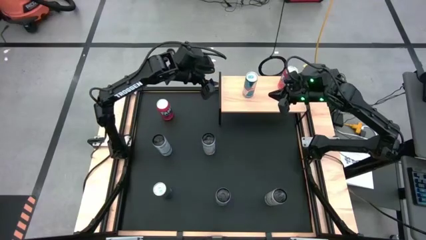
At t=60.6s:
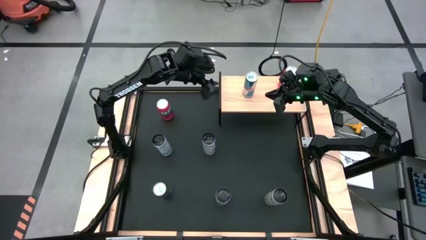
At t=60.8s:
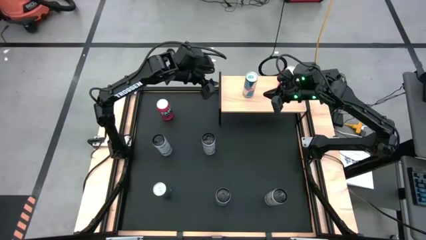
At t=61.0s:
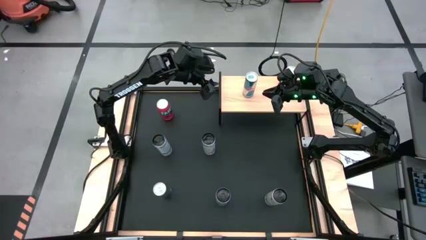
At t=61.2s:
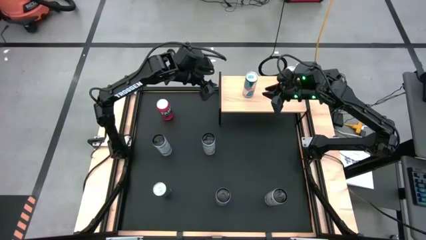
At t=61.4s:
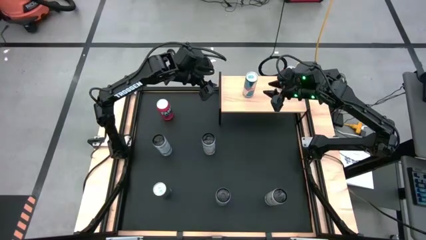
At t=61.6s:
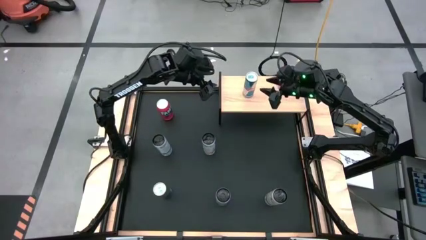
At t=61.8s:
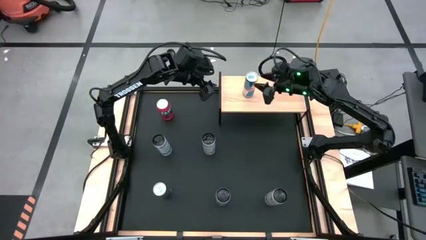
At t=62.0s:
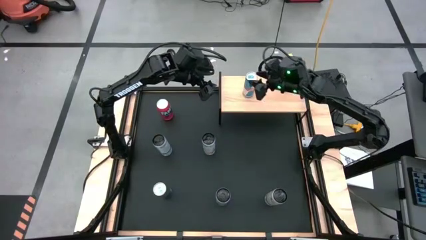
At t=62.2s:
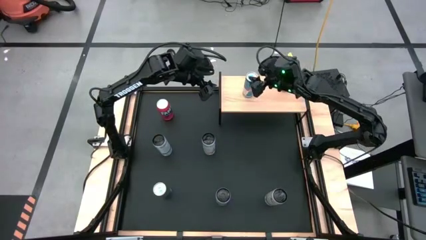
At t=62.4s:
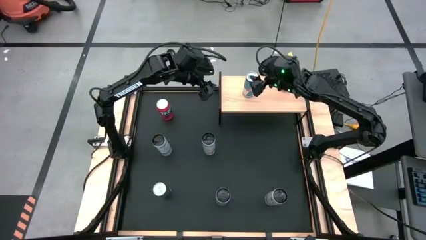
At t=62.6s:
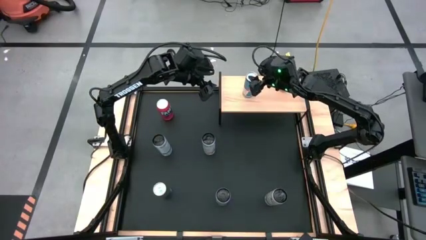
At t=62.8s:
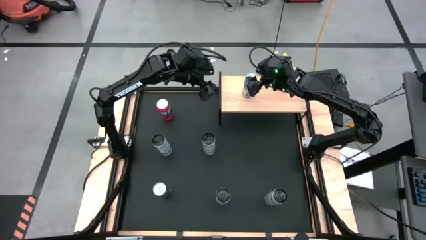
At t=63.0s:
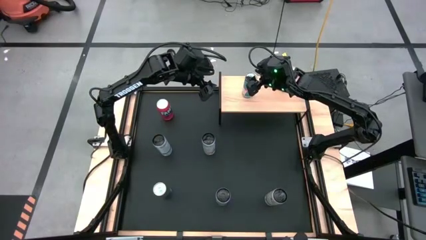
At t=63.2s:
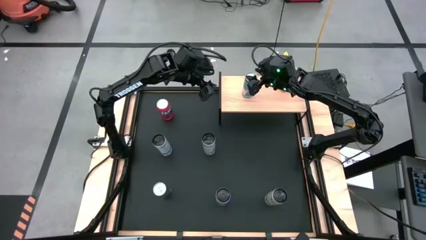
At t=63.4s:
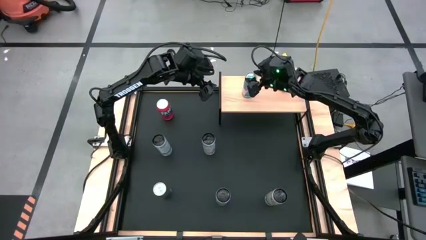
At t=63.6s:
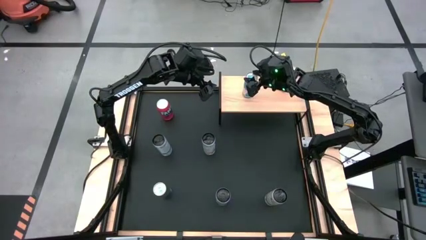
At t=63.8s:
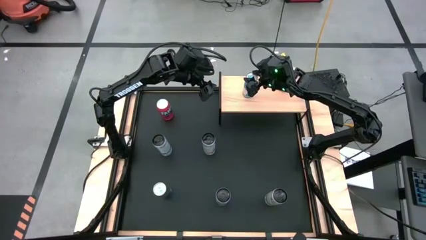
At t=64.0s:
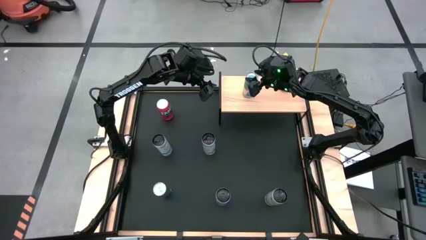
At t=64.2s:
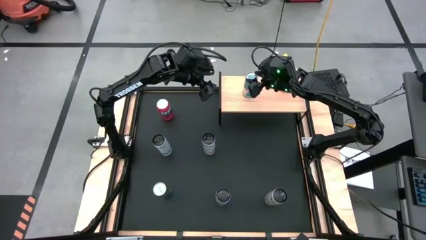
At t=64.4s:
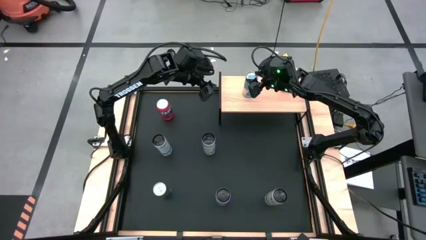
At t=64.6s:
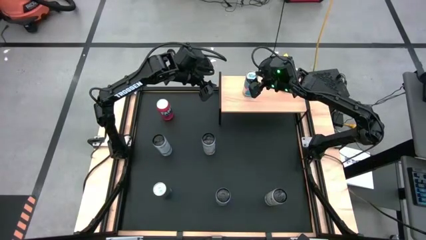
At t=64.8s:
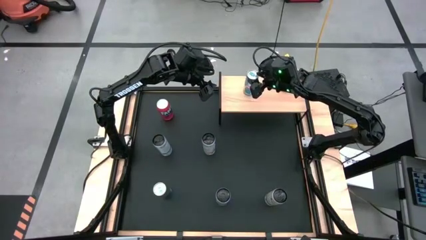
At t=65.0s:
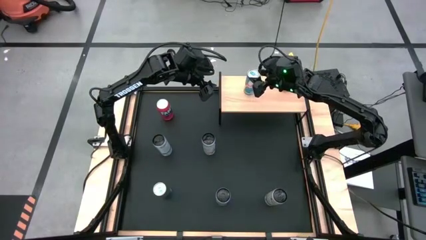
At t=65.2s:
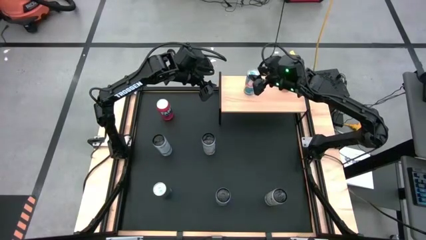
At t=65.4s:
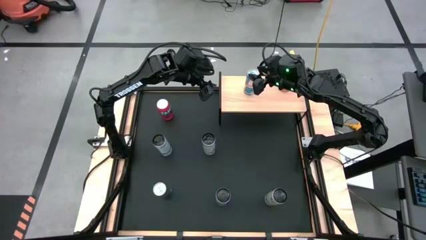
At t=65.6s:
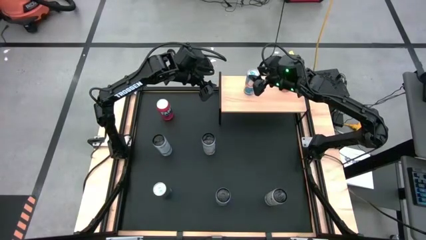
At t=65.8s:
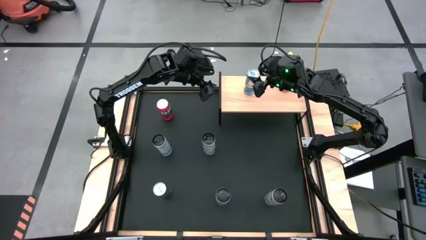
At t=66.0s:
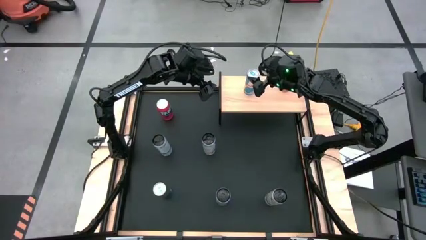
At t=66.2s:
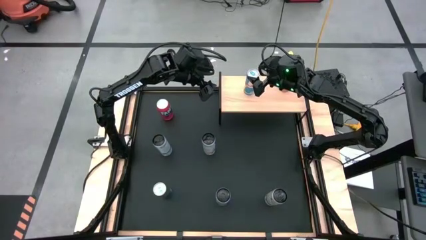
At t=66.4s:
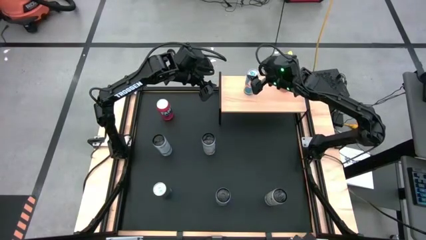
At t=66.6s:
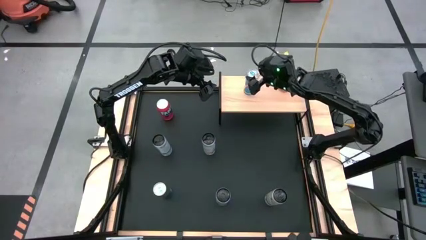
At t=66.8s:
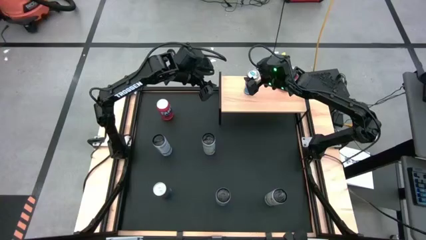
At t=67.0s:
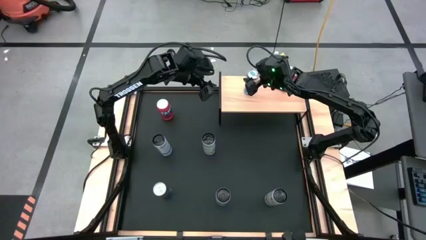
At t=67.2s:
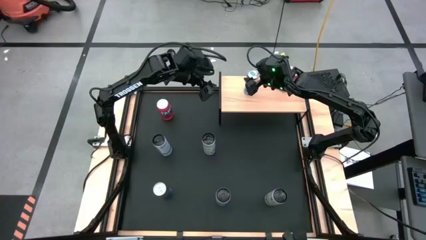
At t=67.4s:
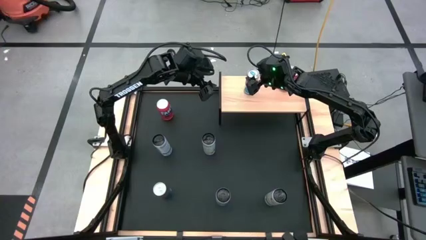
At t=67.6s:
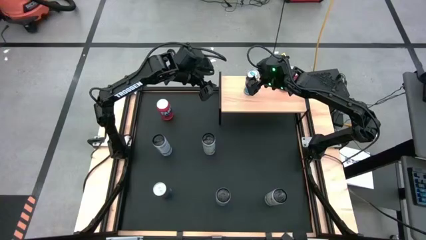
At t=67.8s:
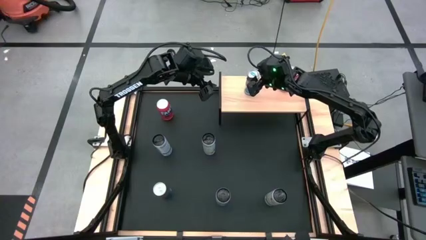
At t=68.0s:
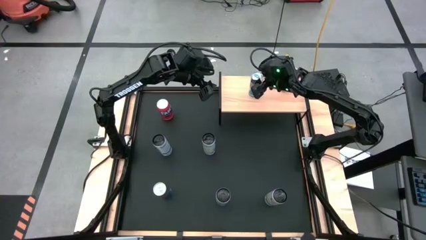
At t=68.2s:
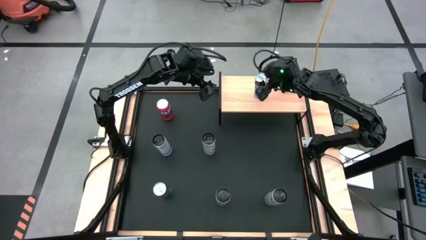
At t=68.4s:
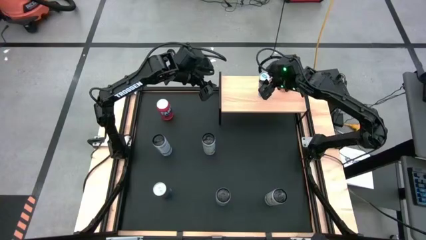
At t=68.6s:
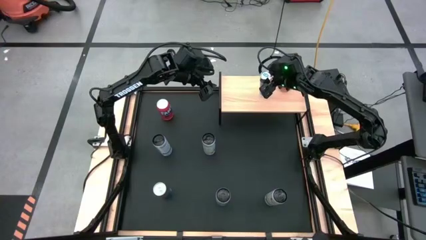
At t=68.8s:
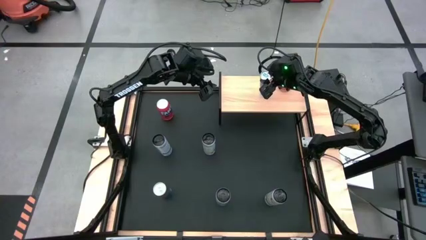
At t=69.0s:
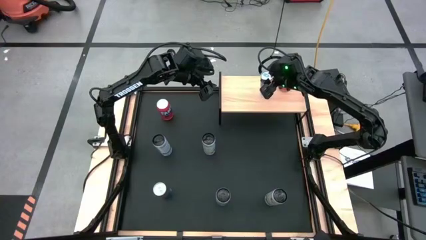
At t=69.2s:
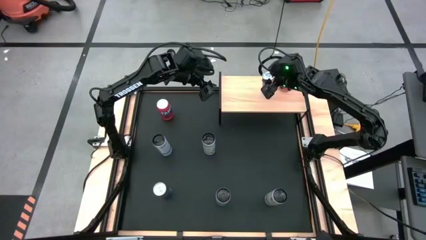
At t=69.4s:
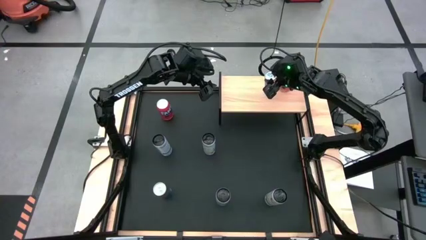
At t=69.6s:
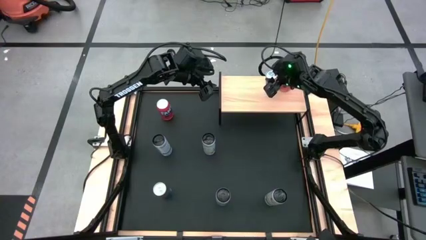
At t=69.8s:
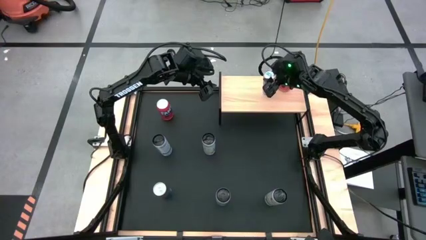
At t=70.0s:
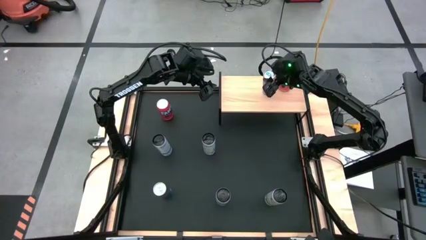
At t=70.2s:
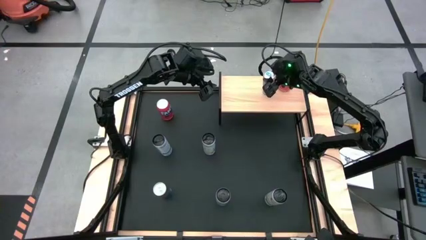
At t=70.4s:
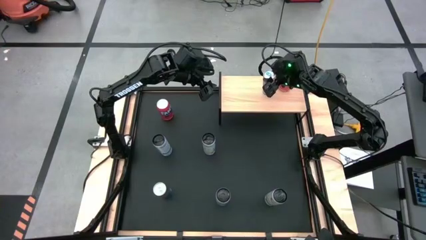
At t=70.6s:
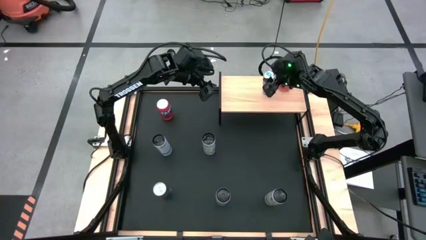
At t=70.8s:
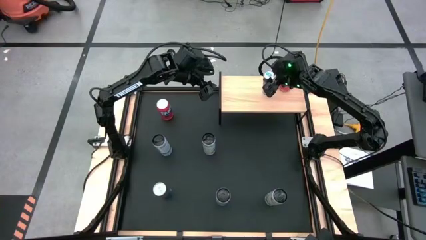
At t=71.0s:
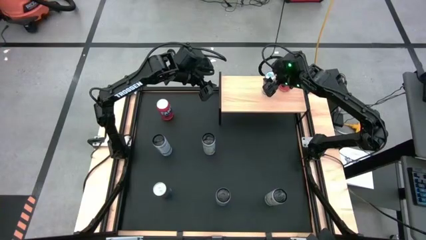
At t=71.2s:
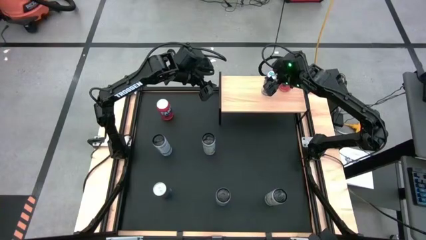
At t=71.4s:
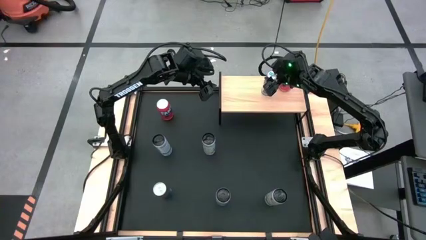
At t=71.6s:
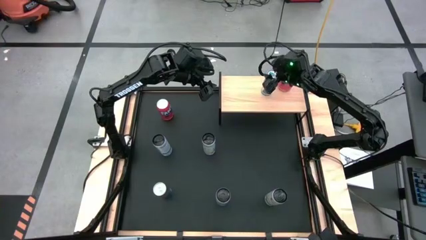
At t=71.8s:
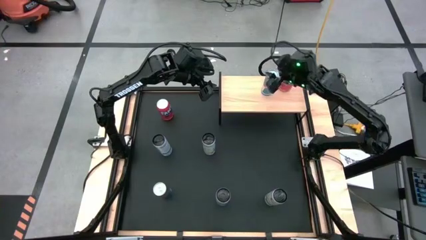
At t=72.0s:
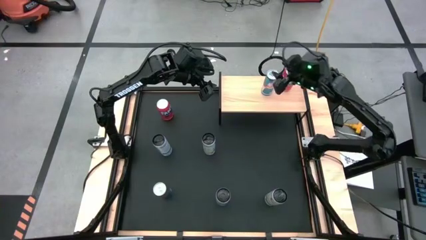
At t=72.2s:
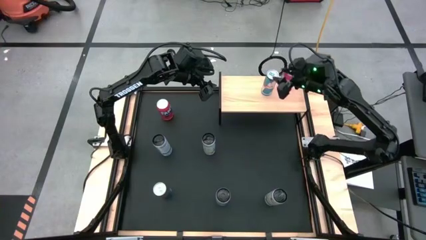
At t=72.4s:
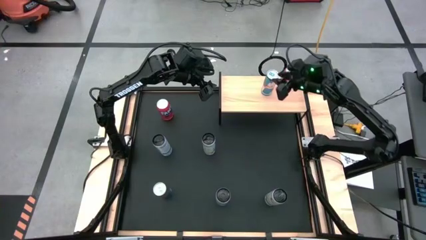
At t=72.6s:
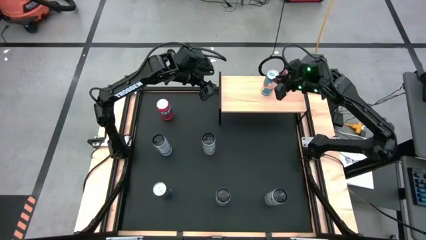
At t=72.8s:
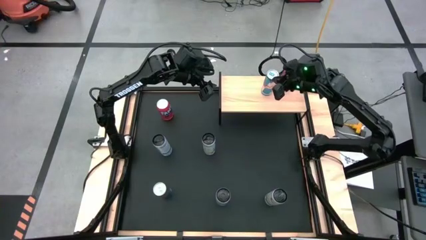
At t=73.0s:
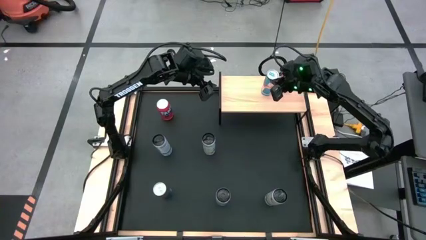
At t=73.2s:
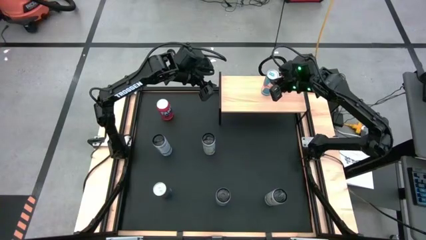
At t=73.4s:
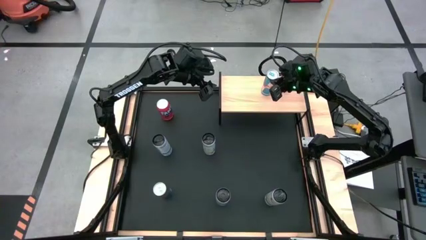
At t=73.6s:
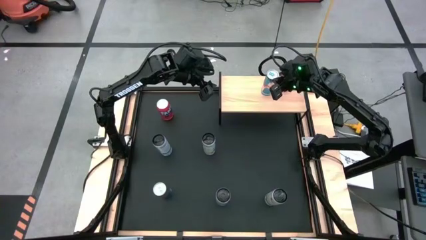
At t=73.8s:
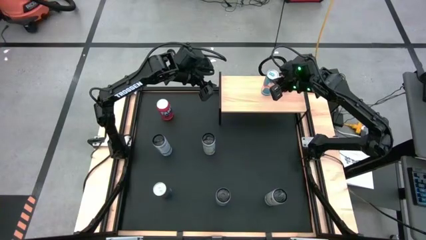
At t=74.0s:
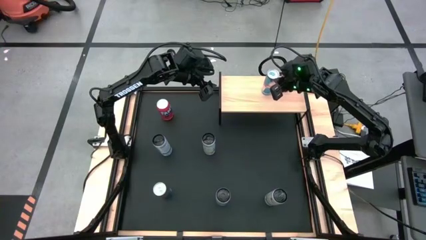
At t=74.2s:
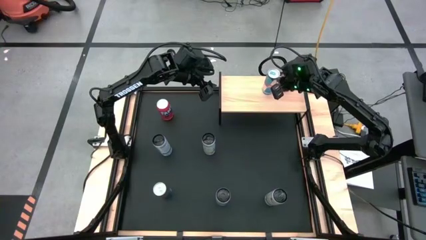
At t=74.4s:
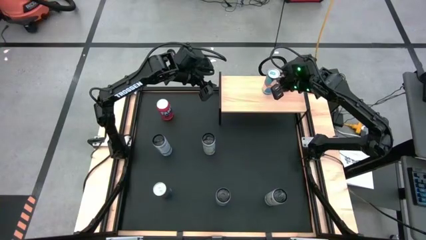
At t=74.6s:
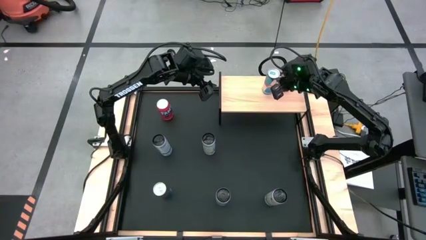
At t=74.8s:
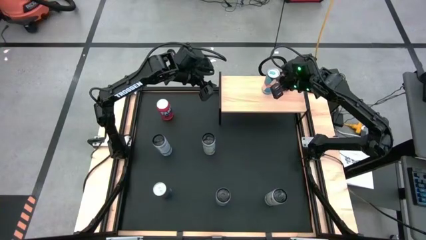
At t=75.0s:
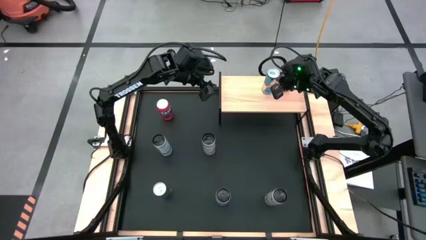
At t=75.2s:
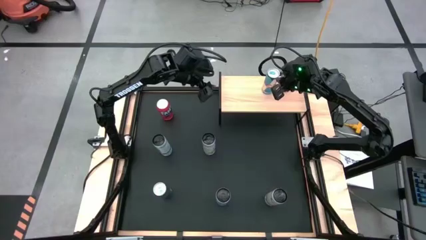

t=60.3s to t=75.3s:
Task: Place canned beverage on shelf
Put the top blue soda can on the shelf
